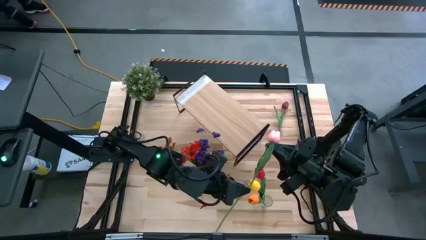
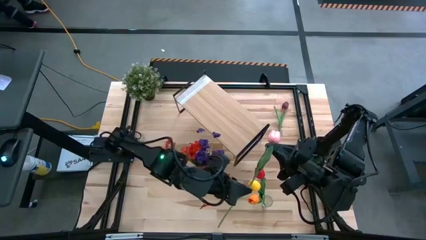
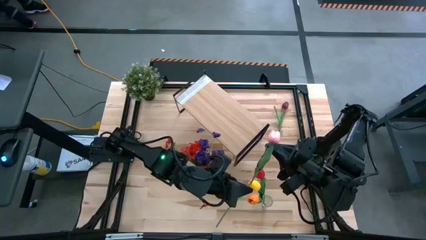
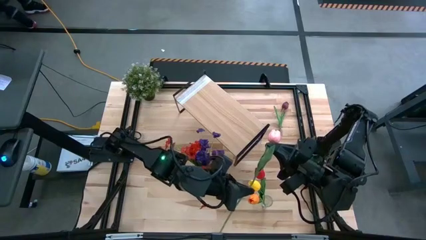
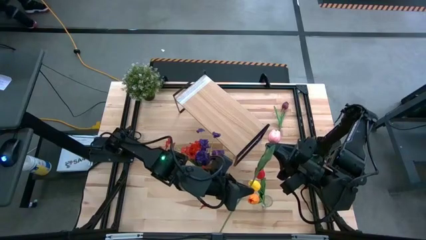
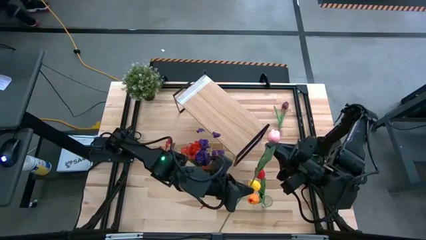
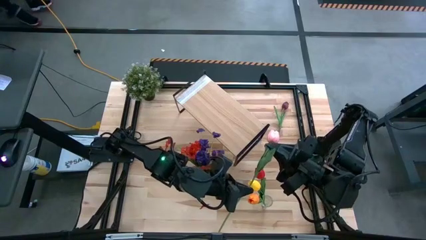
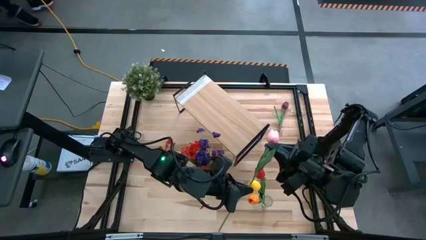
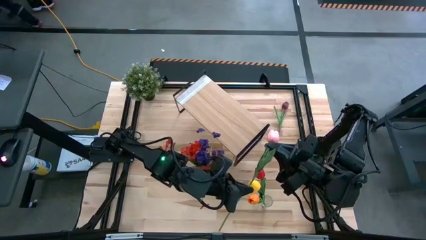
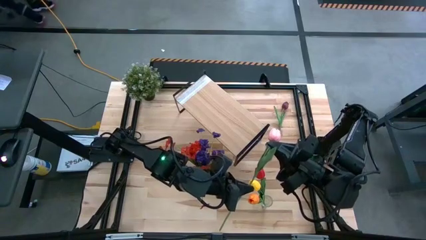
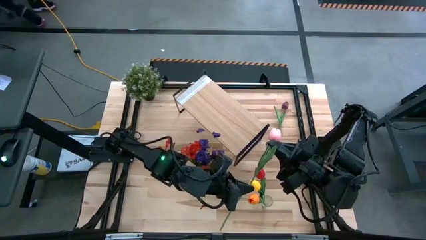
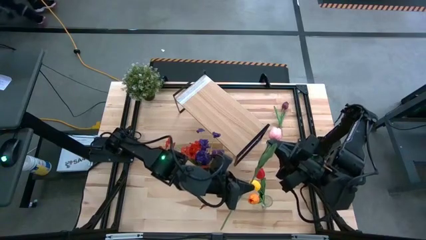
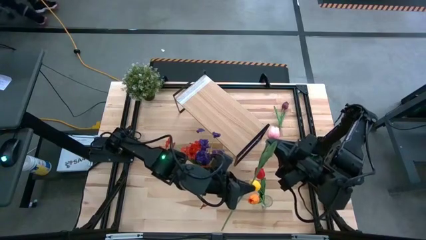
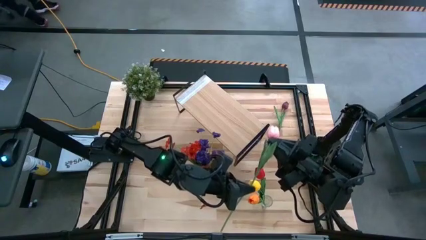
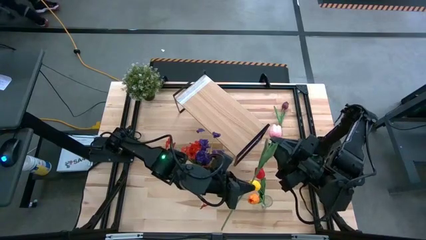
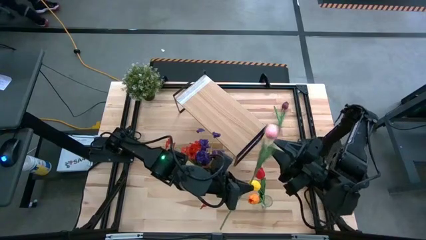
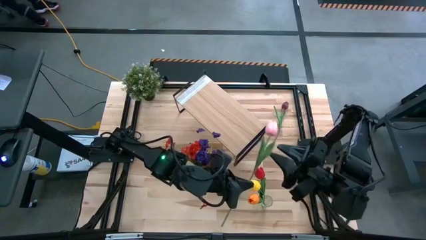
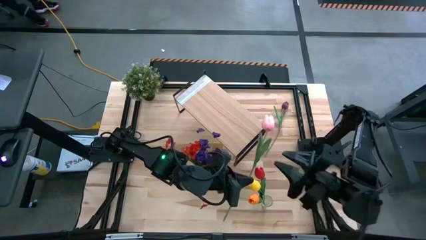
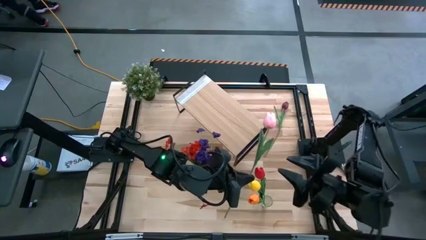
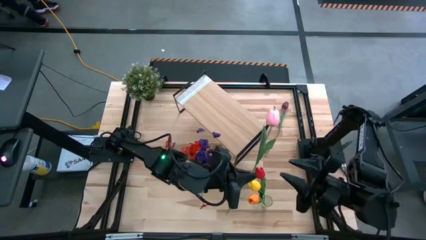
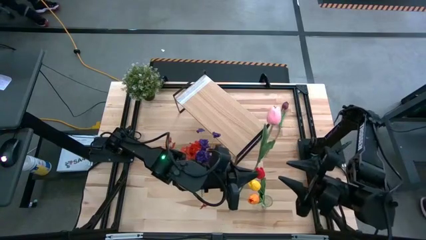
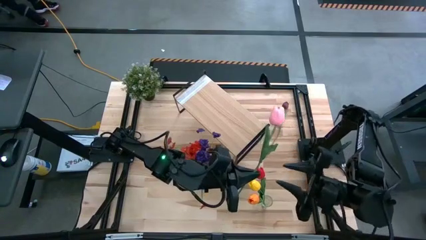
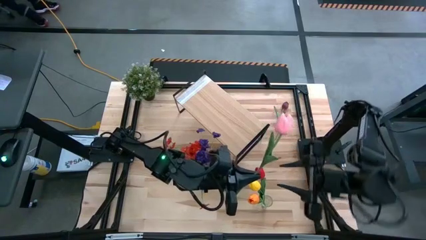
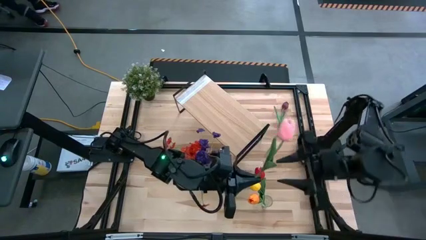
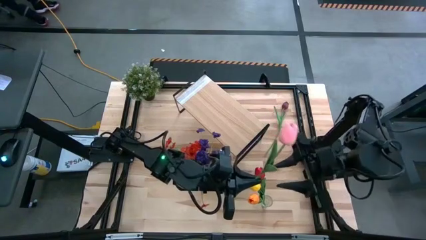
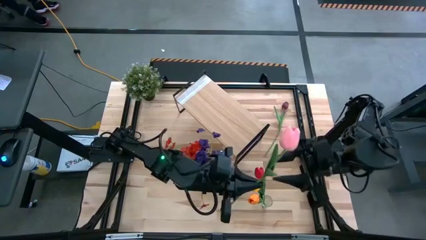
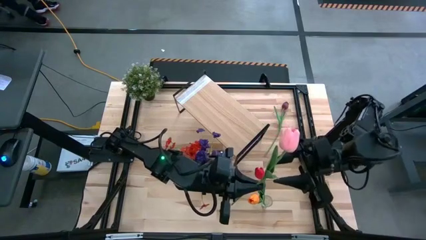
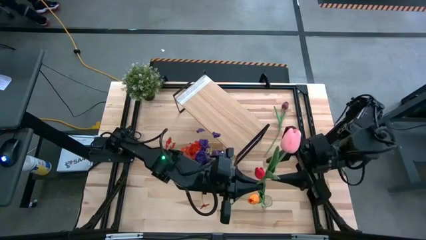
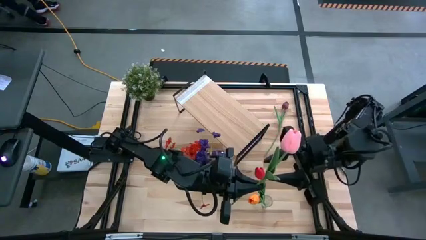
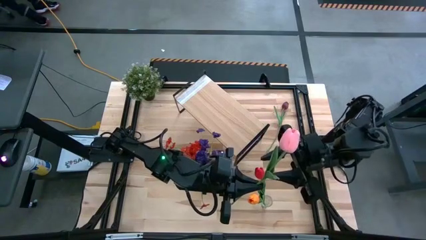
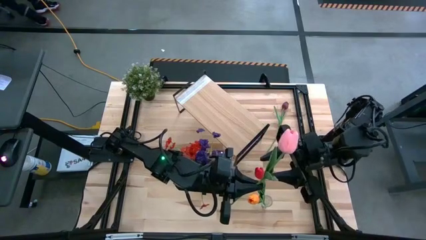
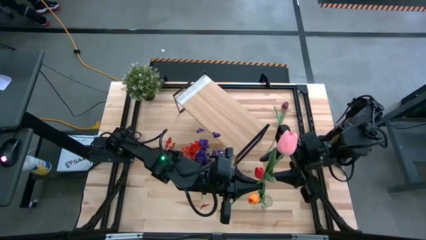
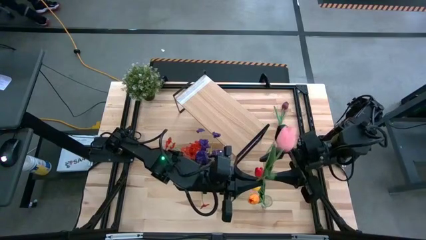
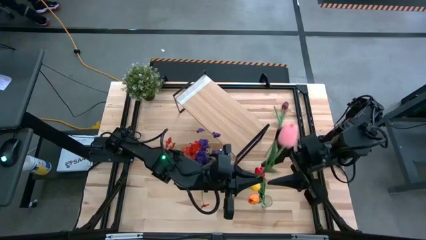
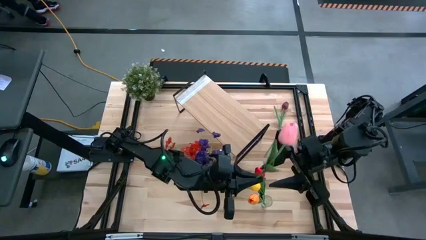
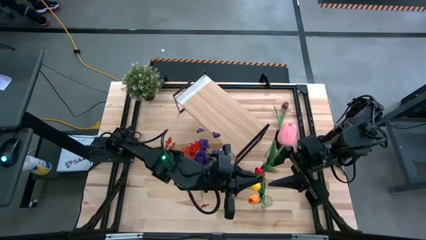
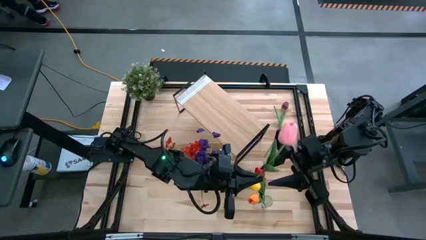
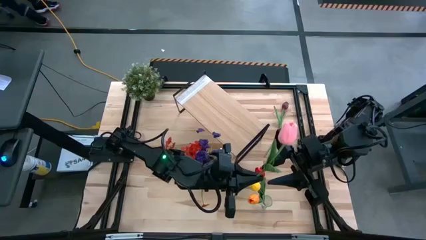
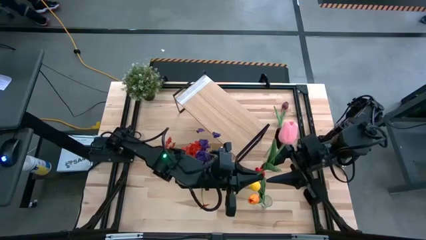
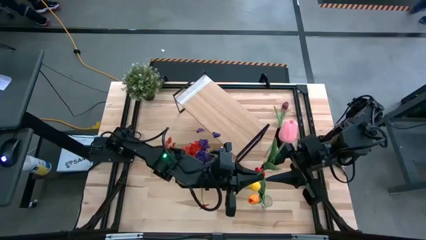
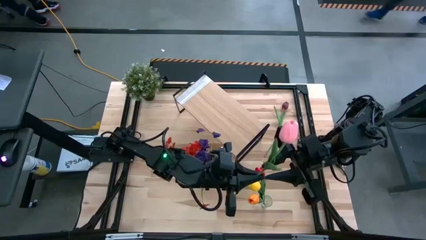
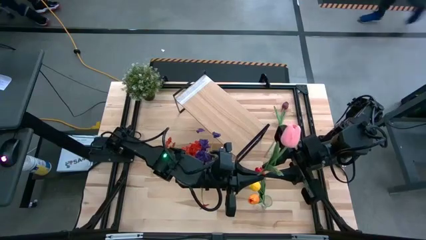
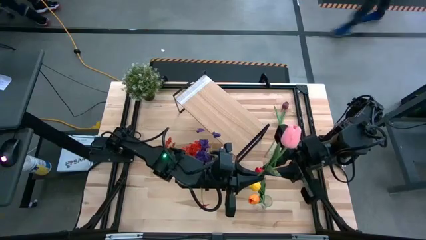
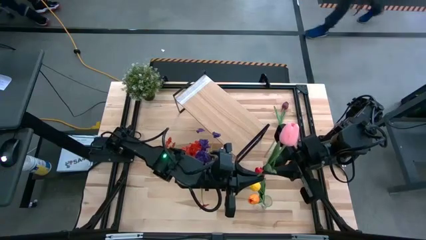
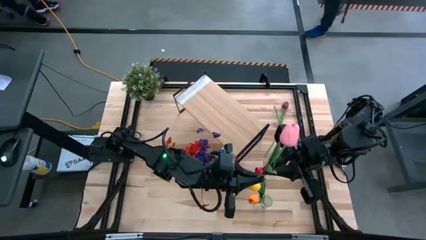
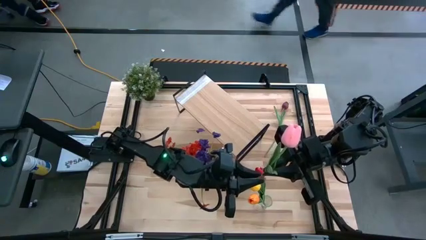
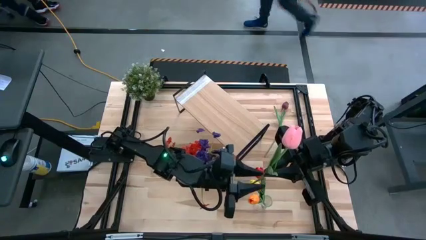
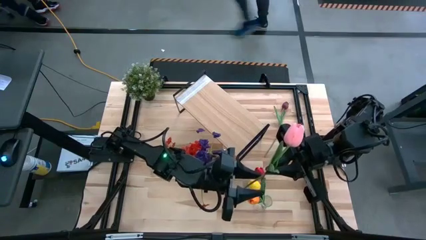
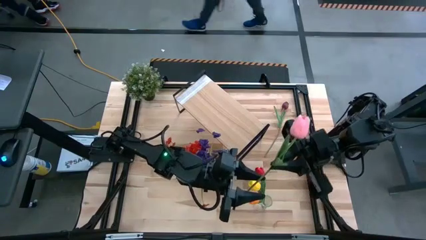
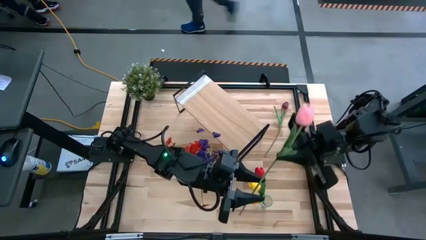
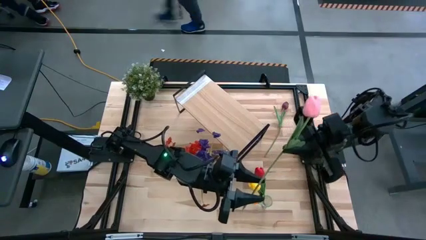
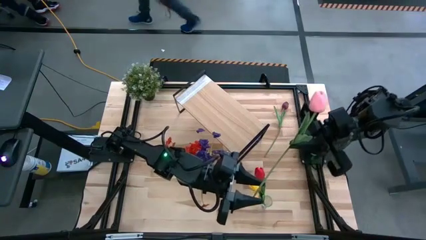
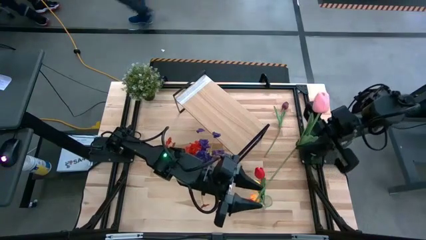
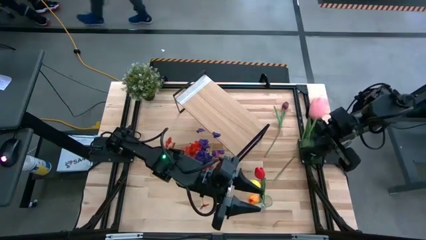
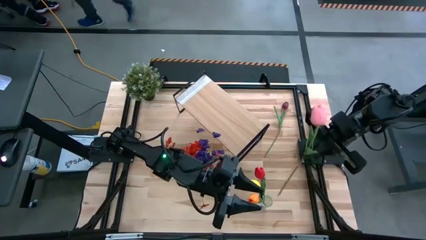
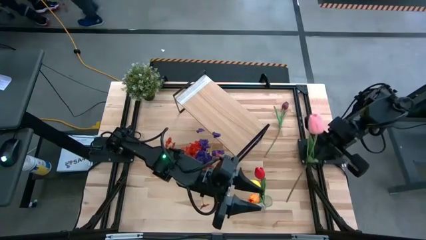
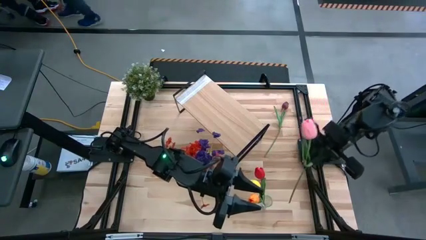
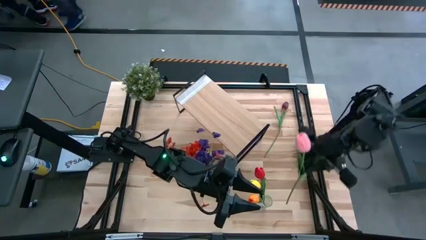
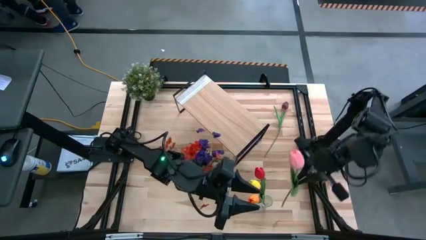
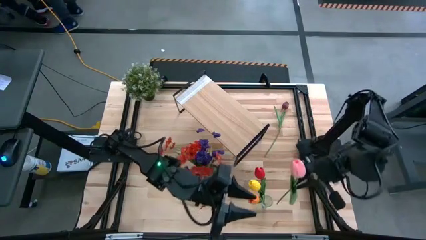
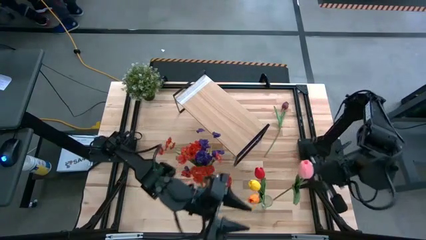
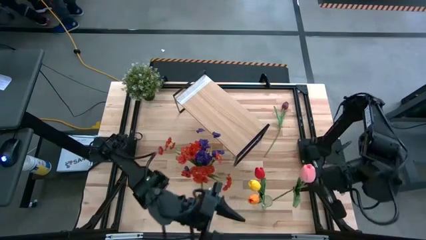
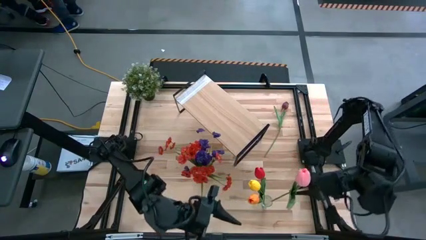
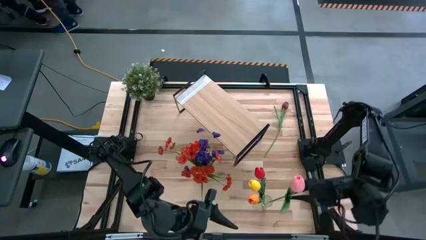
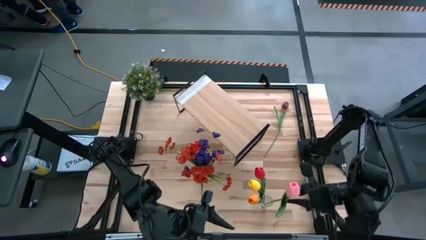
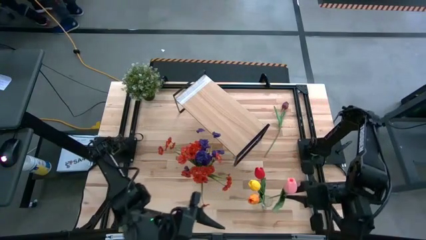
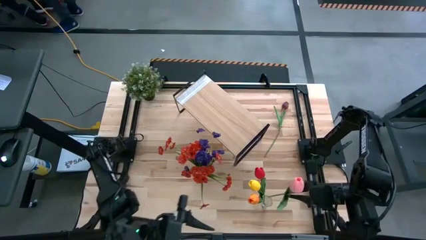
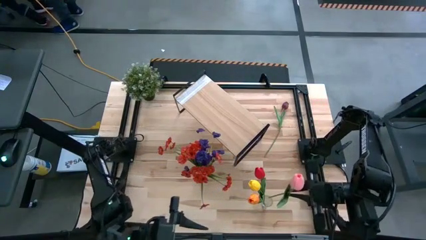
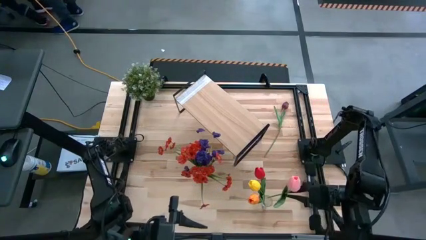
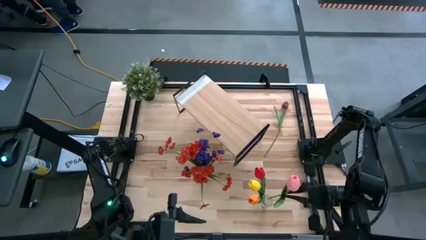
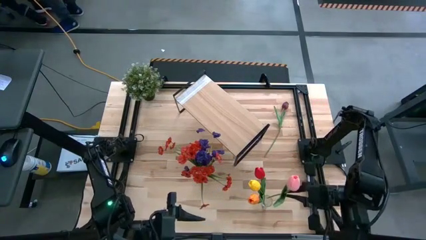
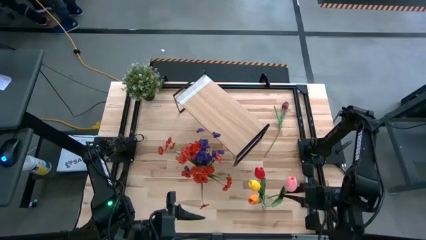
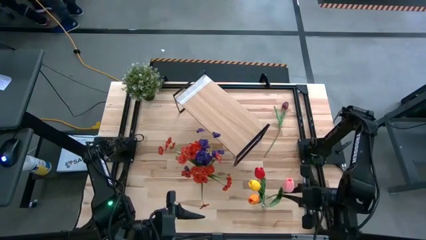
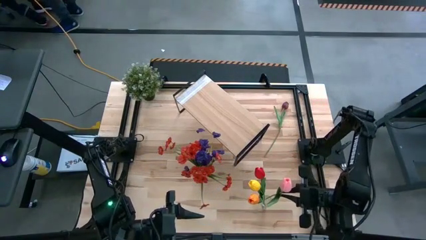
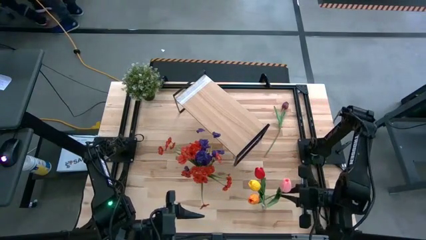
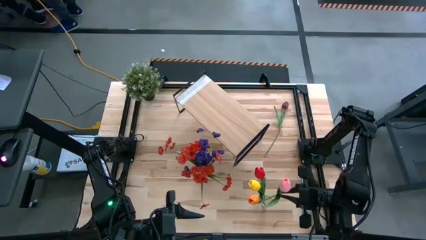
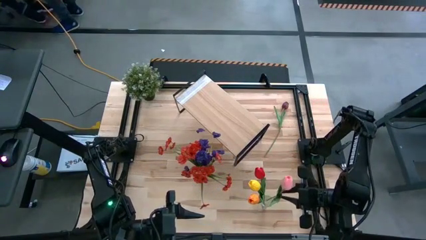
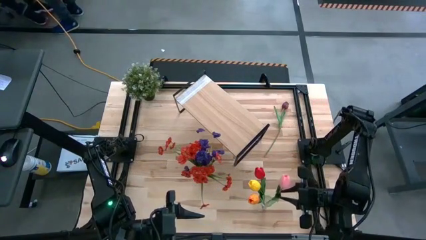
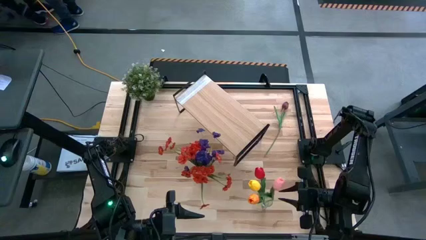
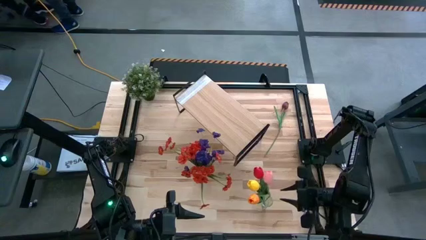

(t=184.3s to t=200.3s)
Task: Pick and place flowers into a vace then onto a shelf
Put the pink tulip into the right transparent vase
